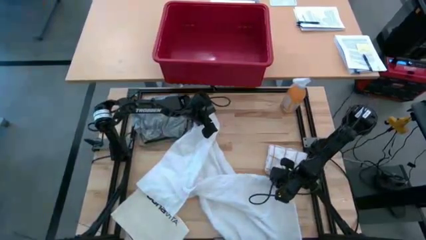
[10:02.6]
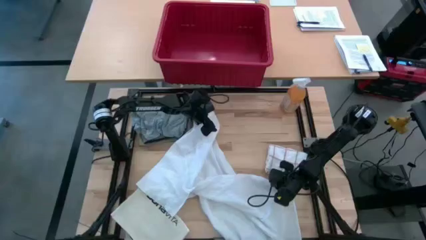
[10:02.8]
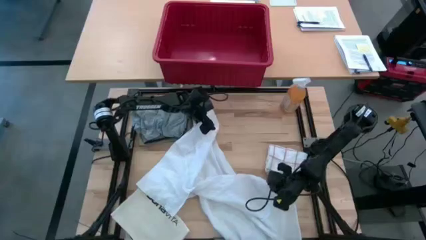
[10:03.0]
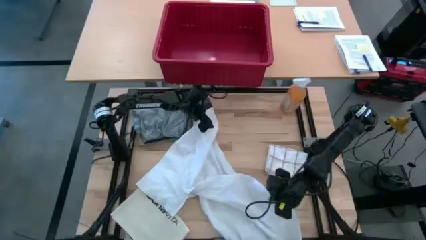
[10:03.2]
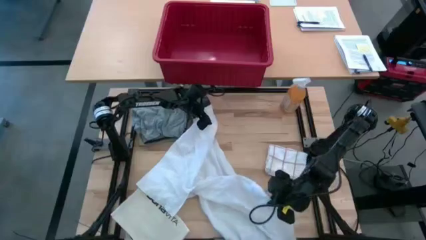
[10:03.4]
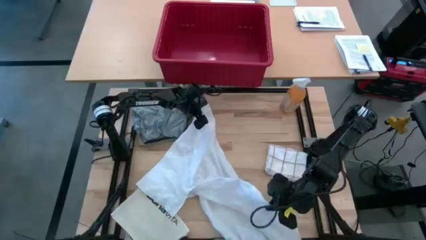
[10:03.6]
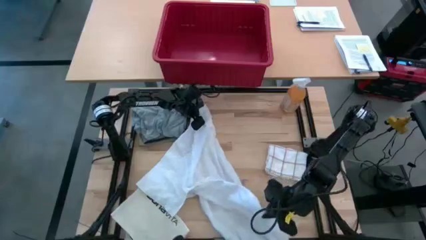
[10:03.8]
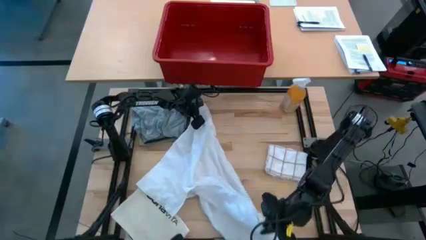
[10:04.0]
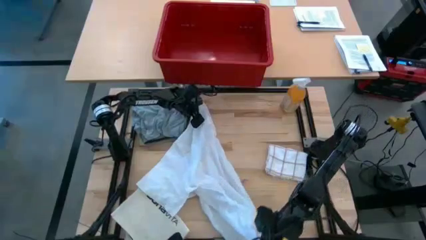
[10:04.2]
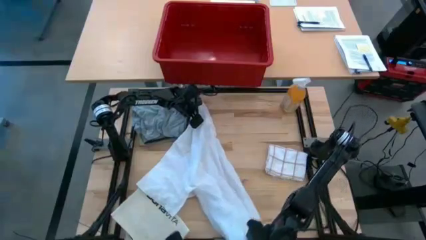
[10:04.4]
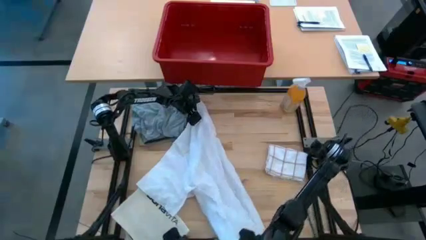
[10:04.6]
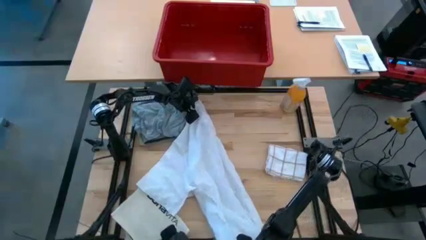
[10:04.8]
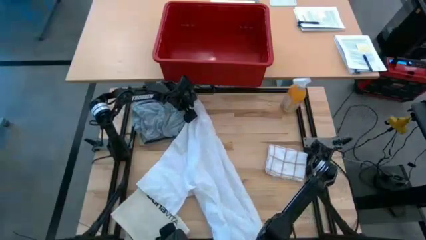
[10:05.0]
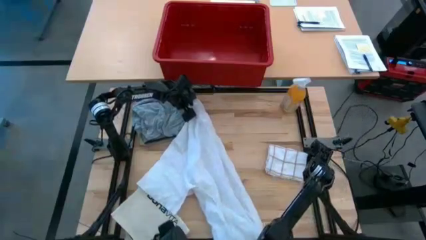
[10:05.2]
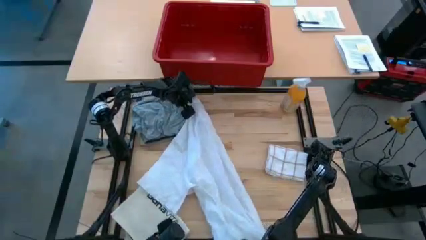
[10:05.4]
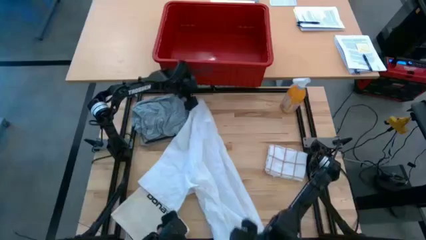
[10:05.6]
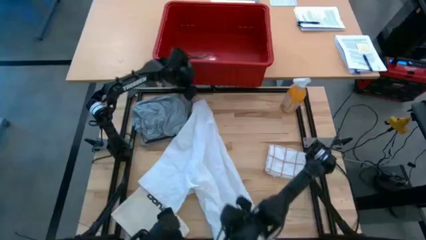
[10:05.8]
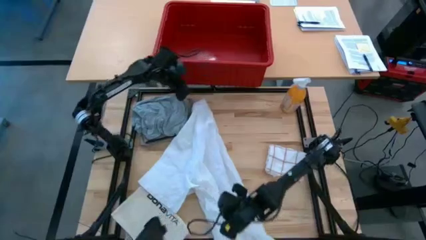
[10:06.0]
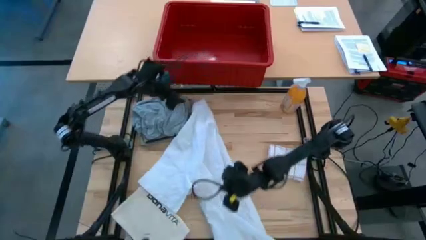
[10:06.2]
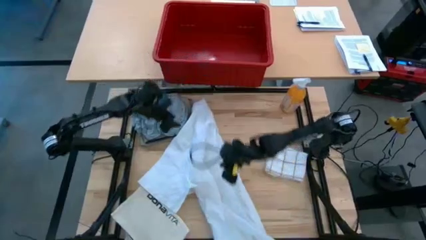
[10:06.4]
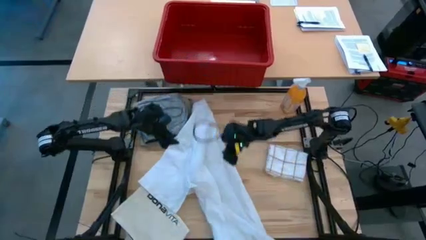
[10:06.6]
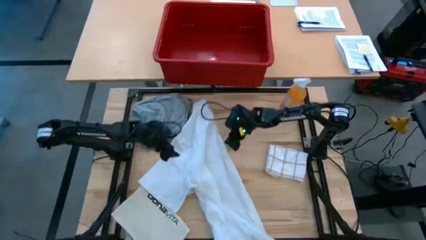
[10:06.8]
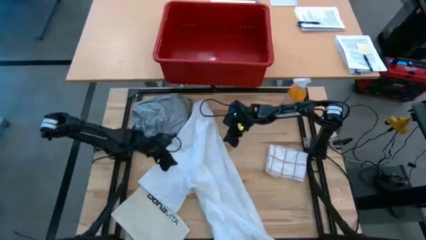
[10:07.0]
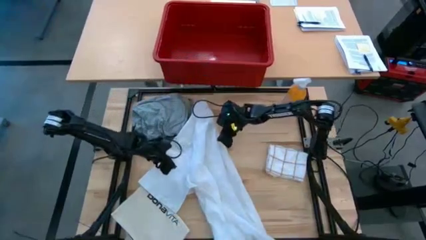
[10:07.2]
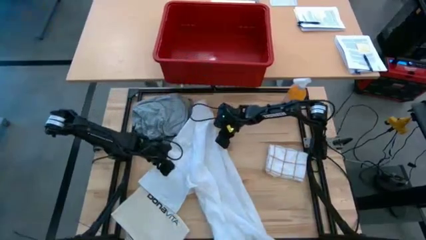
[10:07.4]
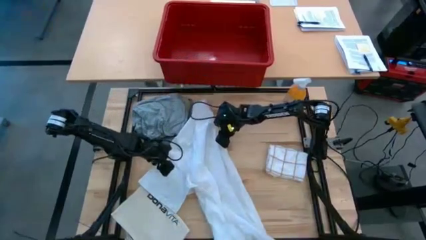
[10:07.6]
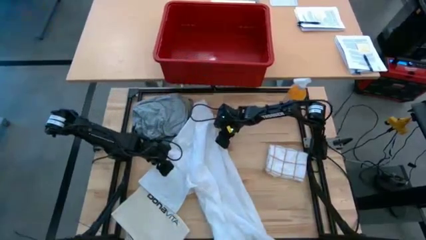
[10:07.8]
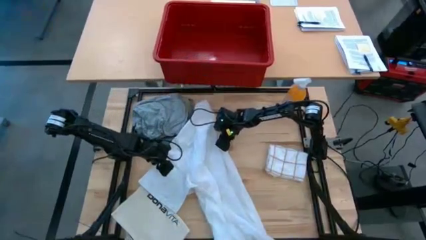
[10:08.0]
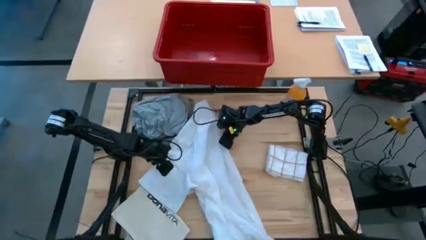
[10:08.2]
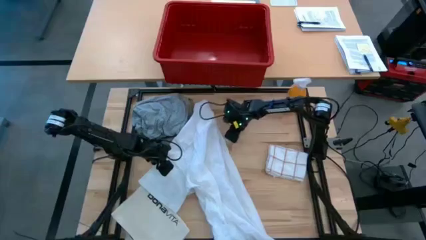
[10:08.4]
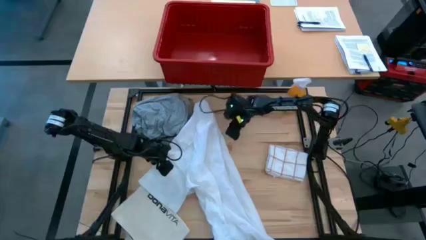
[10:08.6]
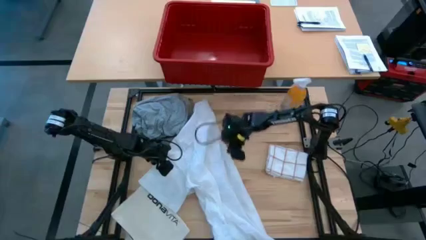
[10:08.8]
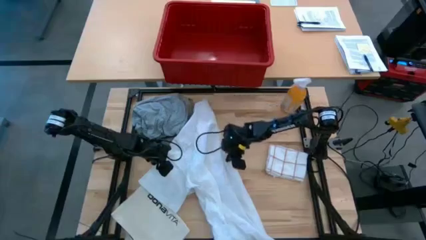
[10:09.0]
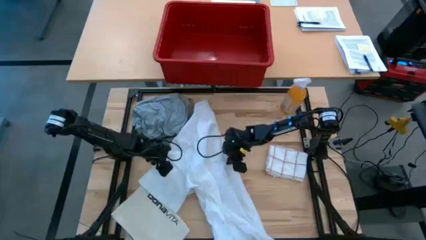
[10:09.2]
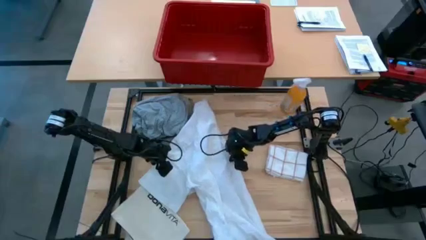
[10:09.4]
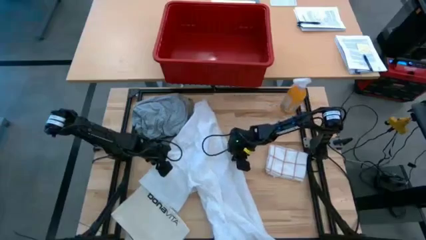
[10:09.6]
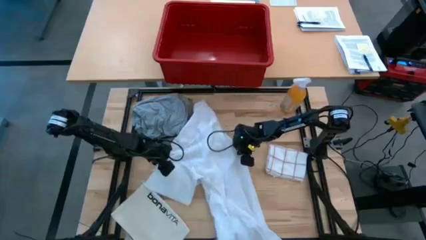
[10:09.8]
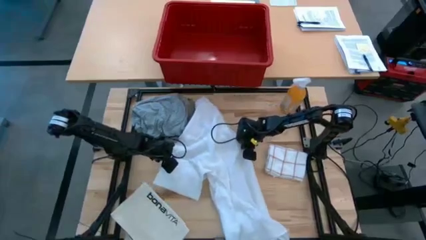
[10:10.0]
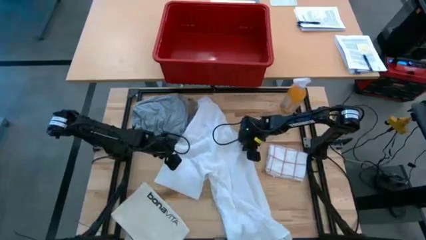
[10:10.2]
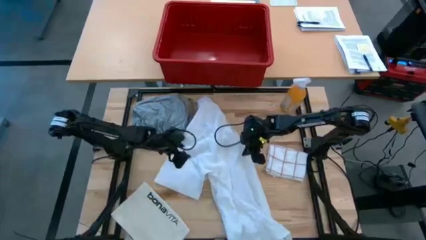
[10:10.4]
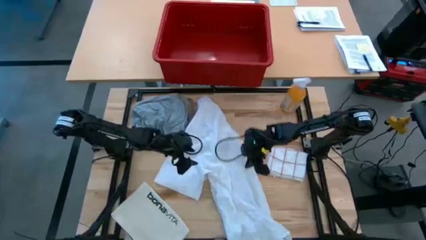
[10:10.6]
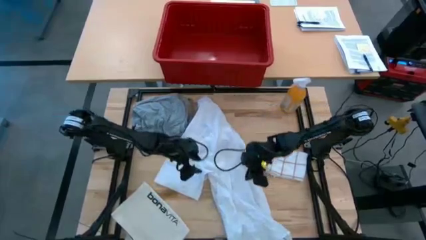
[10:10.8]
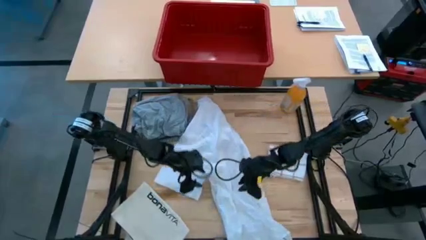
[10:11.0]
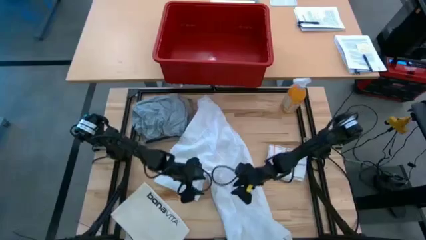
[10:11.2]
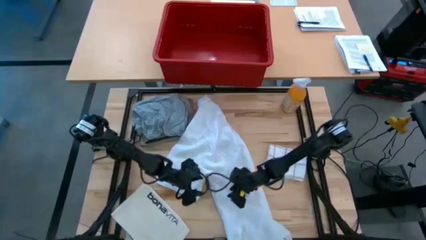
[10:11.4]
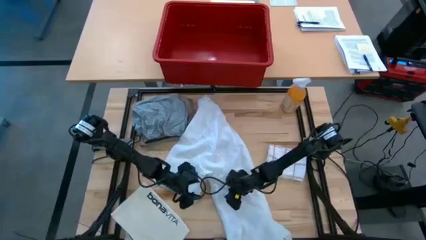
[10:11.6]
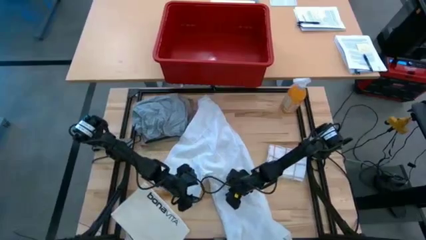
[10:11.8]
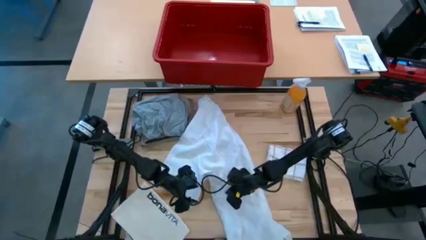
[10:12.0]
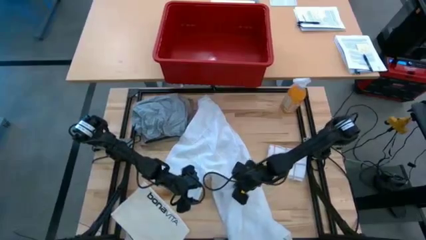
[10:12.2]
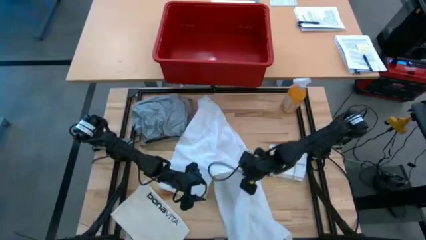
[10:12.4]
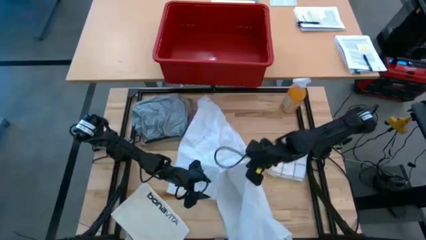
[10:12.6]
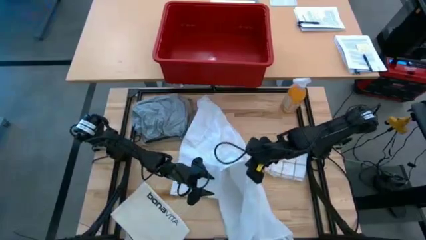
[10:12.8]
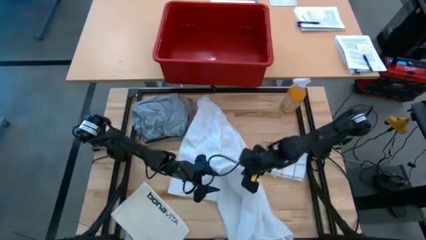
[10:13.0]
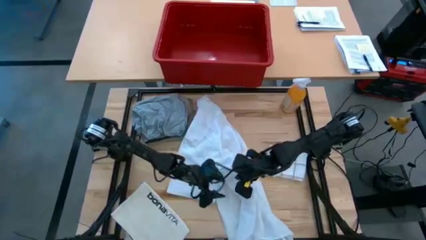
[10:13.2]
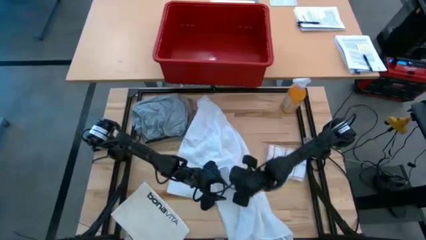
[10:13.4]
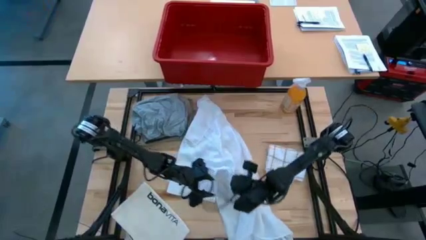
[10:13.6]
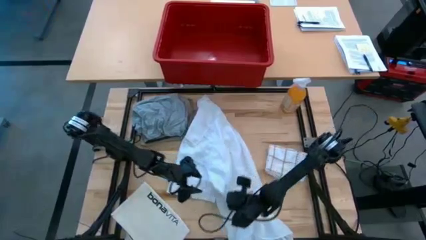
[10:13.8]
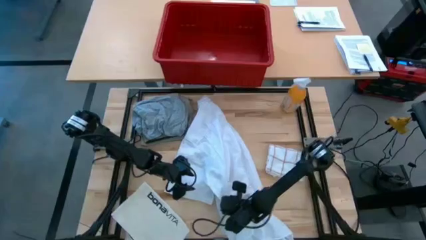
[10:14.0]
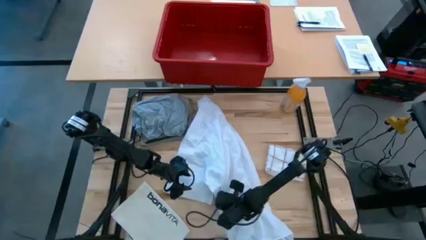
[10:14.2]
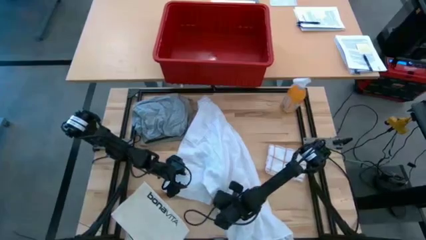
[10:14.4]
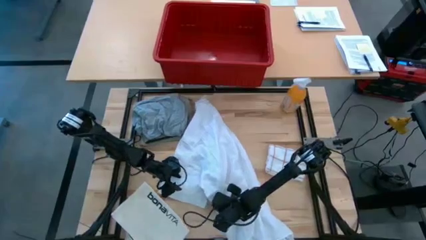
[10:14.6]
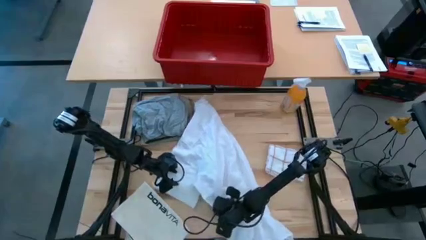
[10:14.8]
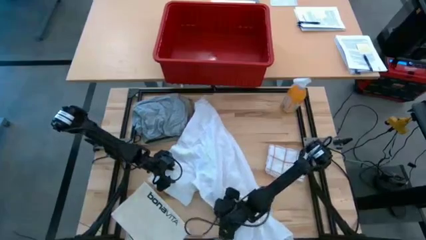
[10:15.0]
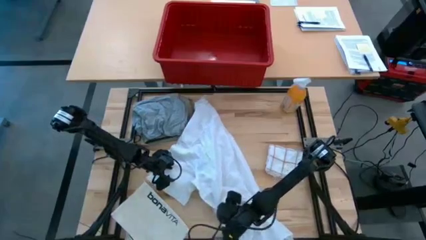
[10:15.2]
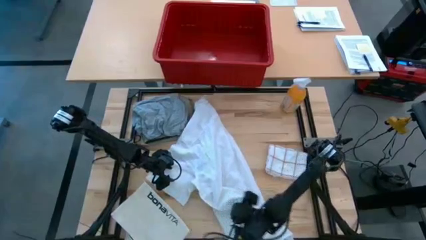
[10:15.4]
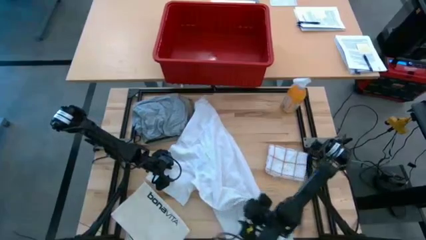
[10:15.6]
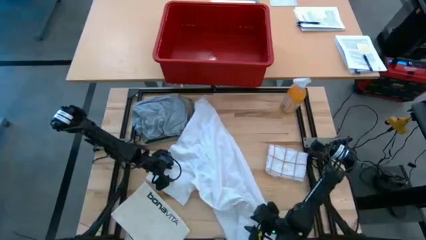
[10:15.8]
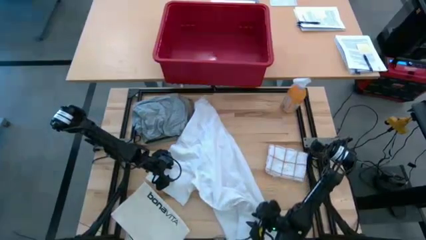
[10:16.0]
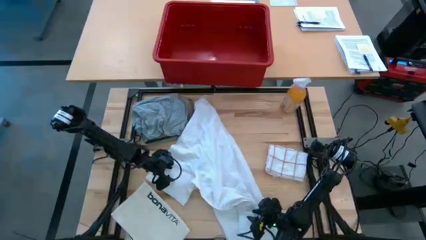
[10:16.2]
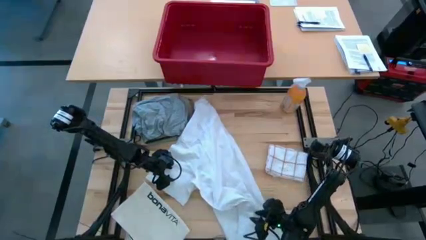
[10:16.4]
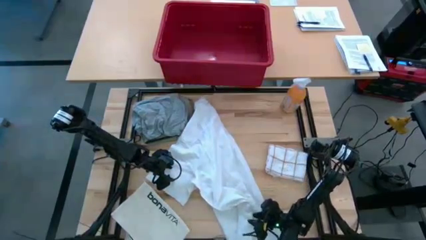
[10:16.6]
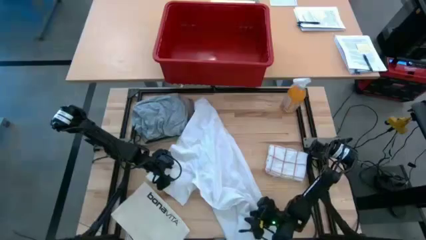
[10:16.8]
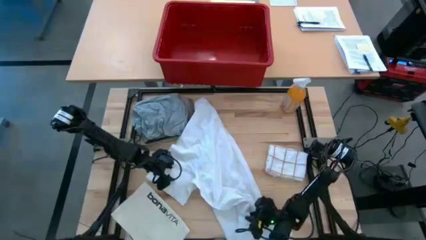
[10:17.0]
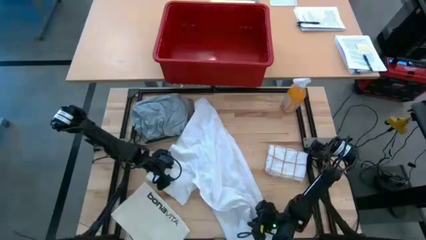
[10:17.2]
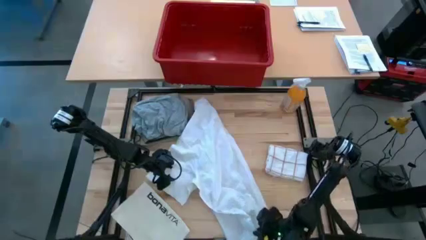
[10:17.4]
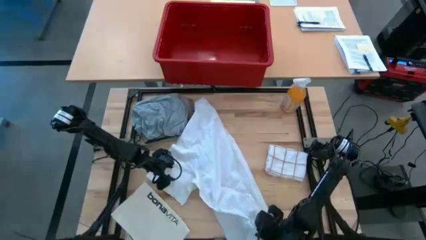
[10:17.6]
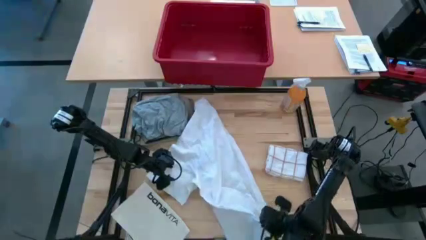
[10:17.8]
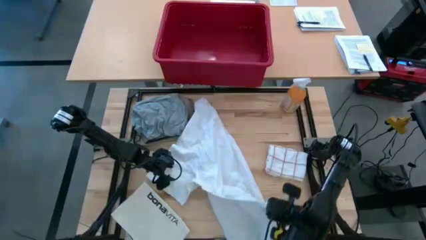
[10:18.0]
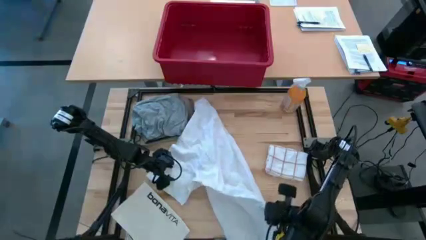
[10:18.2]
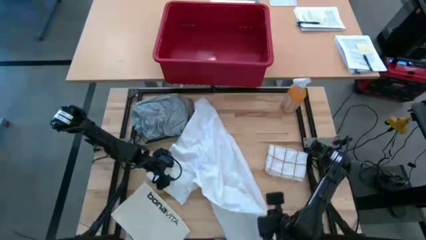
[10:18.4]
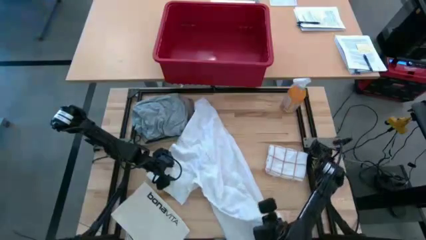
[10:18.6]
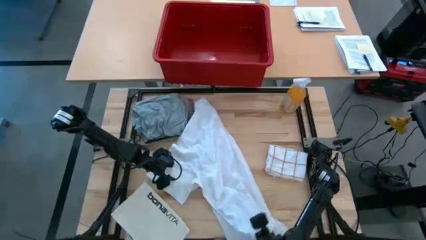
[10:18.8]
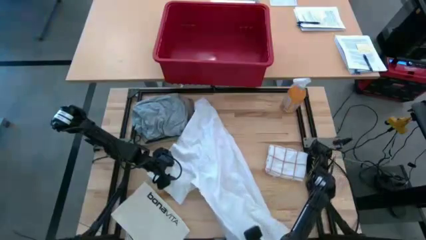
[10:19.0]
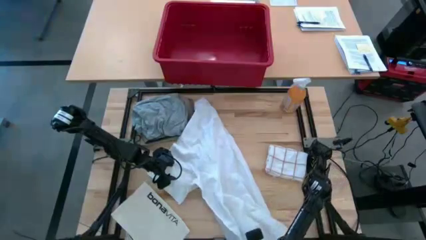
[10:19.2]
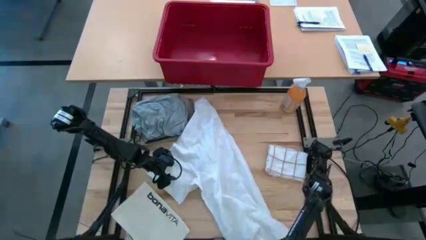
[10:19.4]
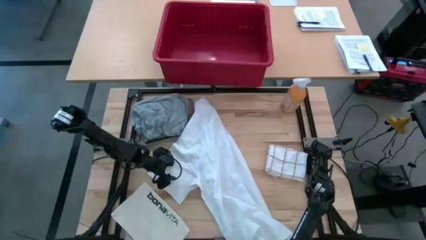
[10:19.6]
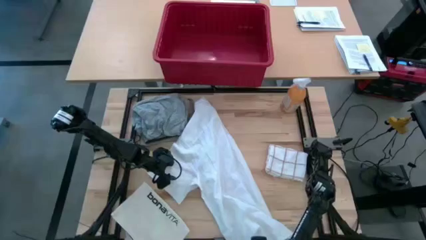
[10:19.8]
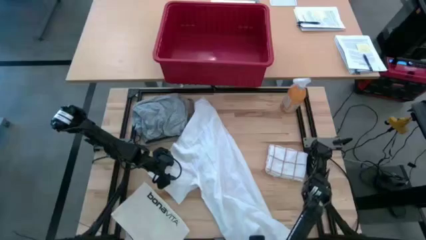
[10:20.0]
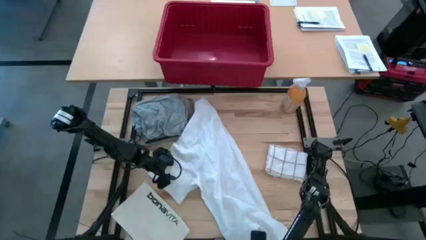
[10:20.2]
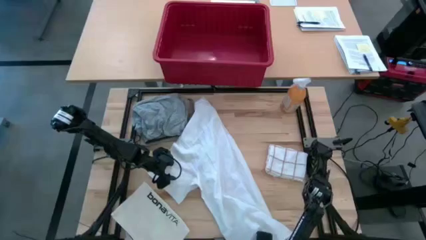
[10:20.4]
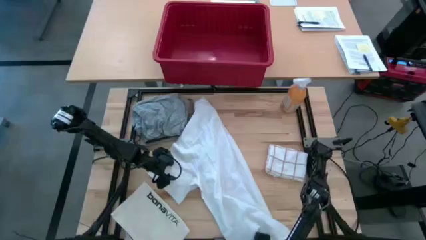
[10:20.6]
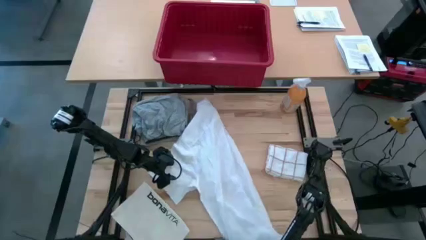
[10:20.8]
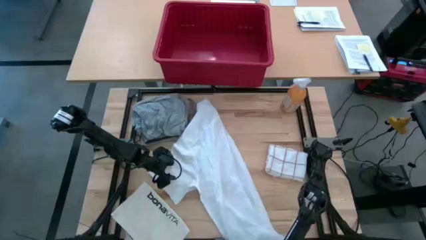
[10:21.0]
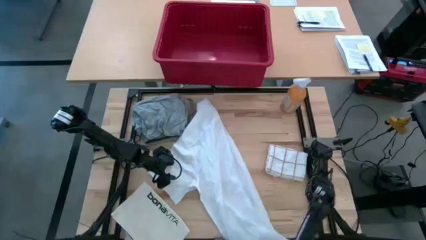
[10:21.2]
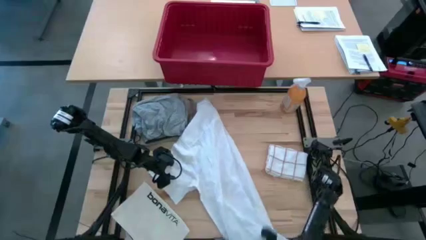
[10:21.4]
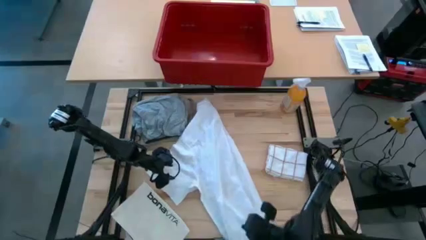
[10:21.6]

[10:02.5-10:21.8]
Task: Fold laundry
Fold the white long sleeve shirt
